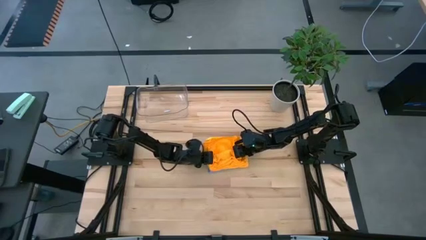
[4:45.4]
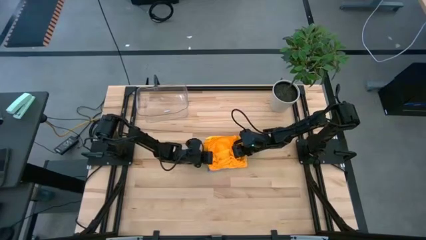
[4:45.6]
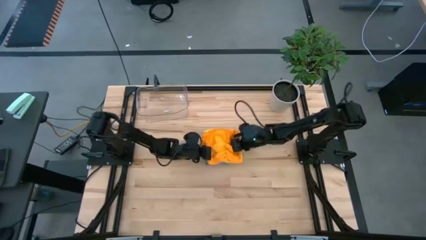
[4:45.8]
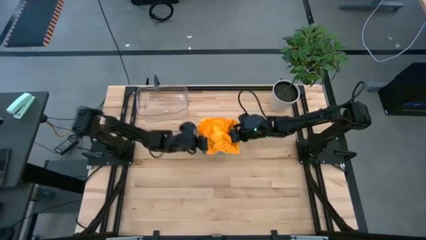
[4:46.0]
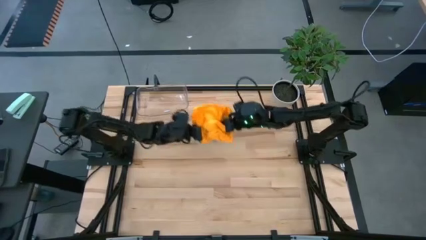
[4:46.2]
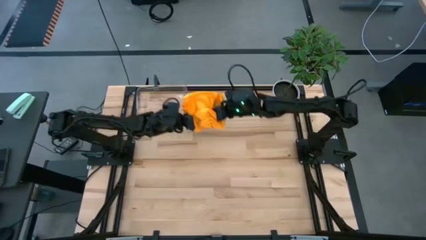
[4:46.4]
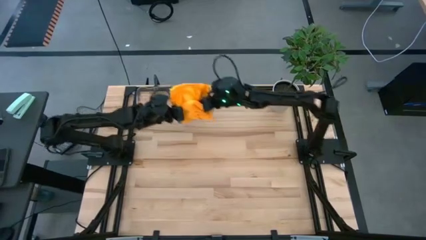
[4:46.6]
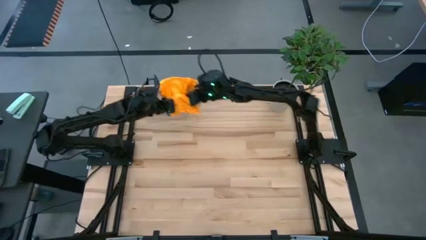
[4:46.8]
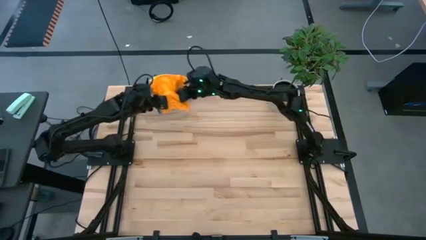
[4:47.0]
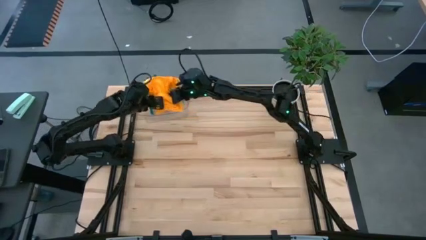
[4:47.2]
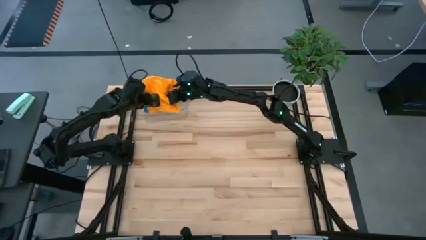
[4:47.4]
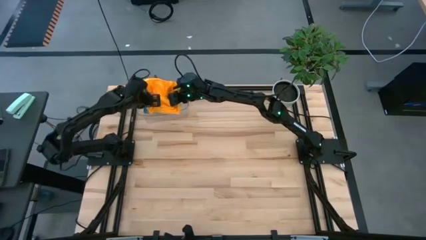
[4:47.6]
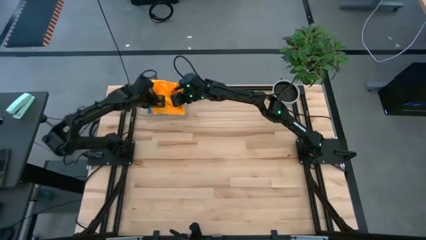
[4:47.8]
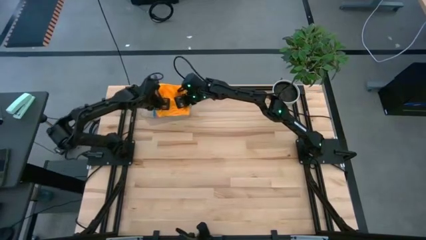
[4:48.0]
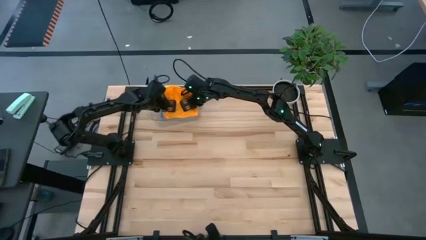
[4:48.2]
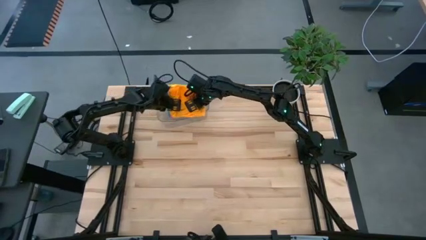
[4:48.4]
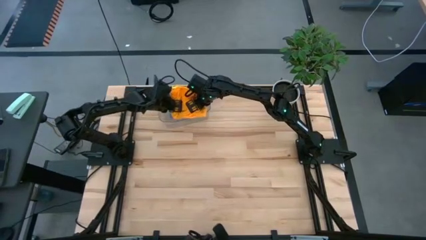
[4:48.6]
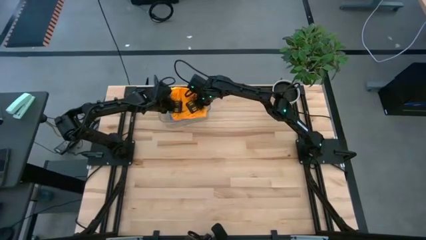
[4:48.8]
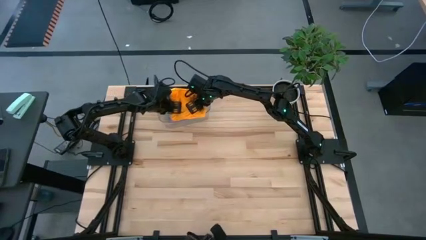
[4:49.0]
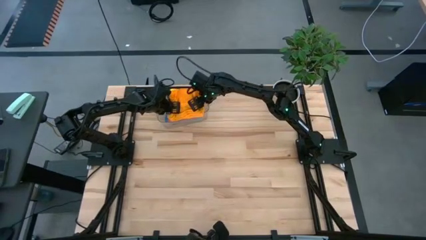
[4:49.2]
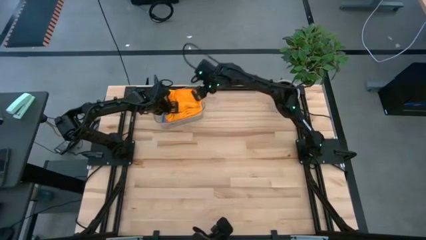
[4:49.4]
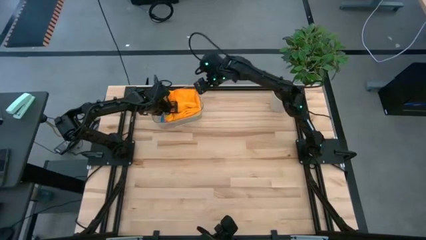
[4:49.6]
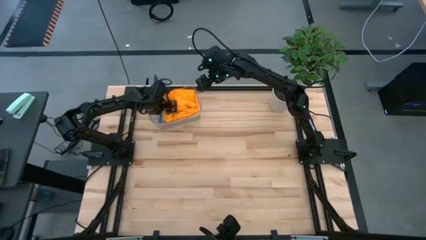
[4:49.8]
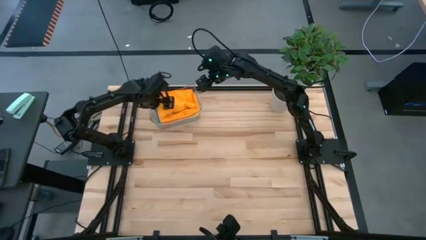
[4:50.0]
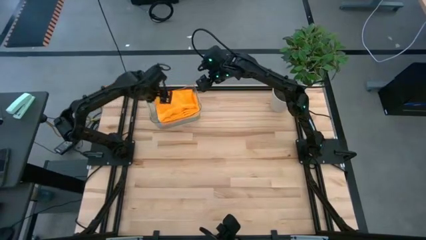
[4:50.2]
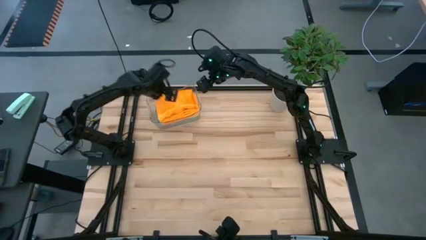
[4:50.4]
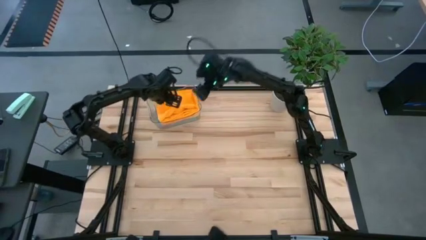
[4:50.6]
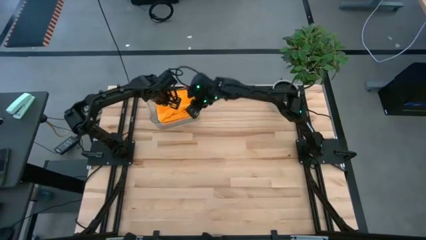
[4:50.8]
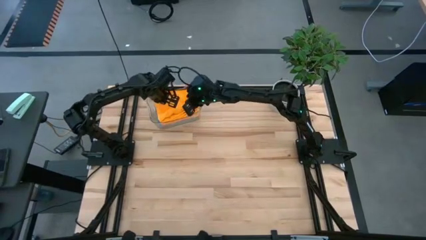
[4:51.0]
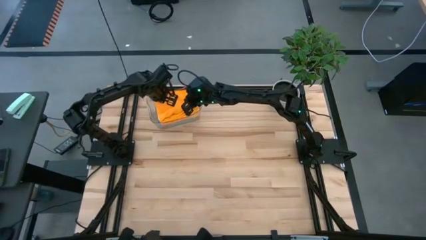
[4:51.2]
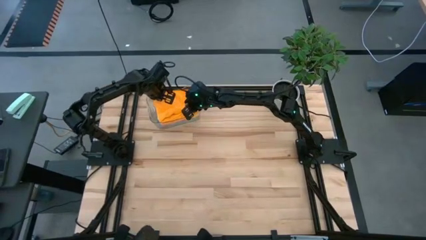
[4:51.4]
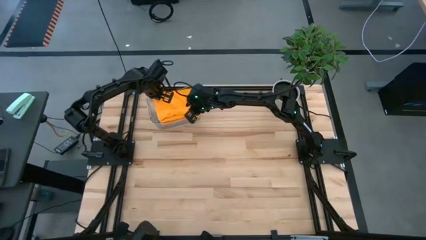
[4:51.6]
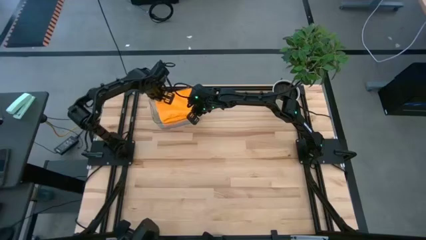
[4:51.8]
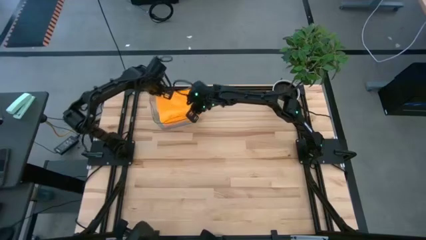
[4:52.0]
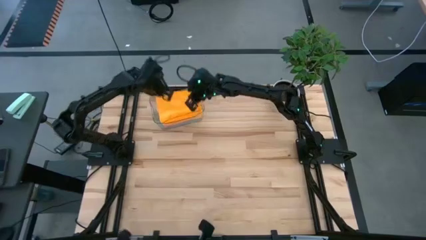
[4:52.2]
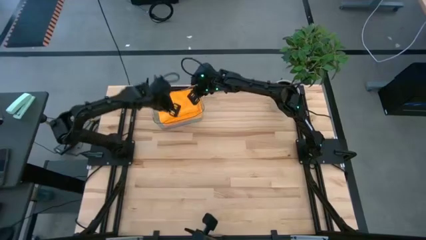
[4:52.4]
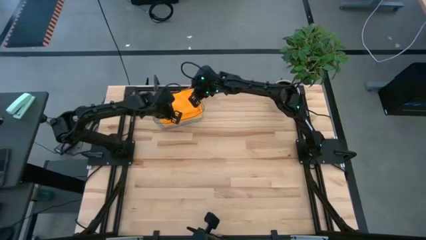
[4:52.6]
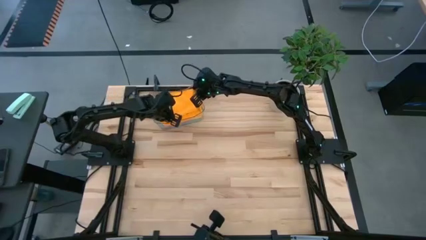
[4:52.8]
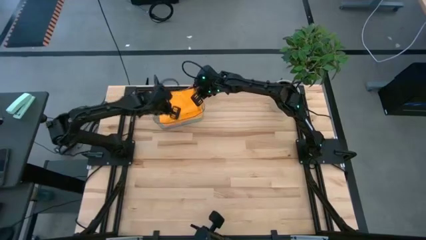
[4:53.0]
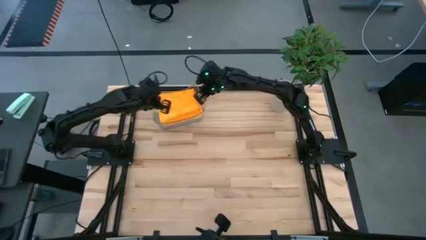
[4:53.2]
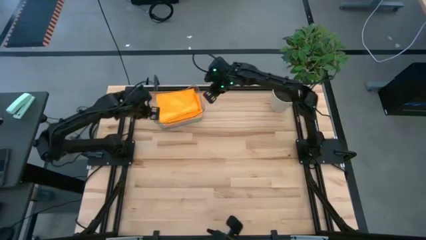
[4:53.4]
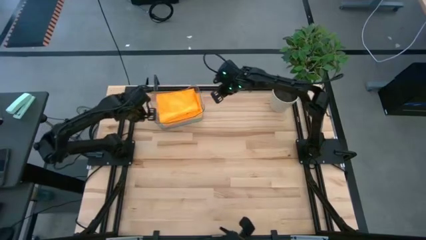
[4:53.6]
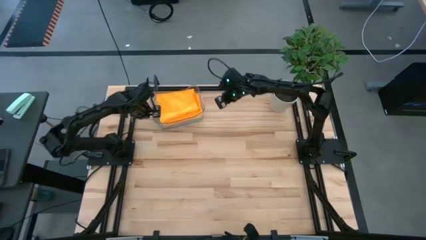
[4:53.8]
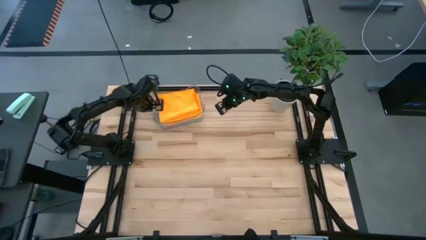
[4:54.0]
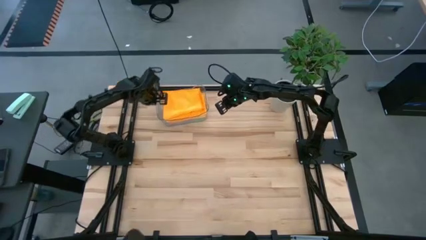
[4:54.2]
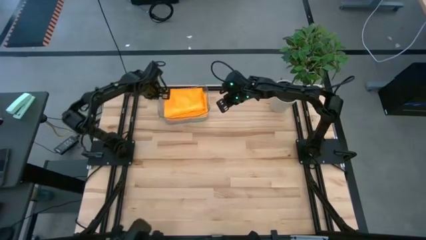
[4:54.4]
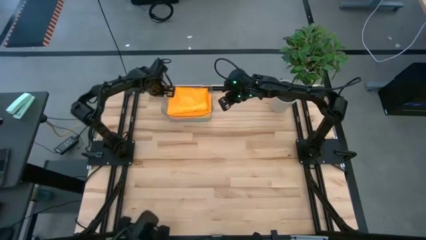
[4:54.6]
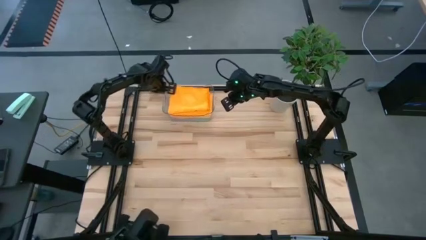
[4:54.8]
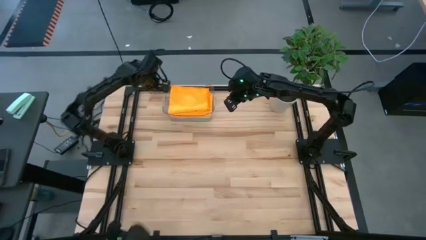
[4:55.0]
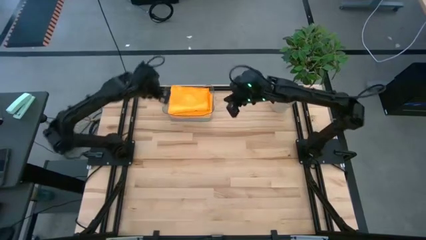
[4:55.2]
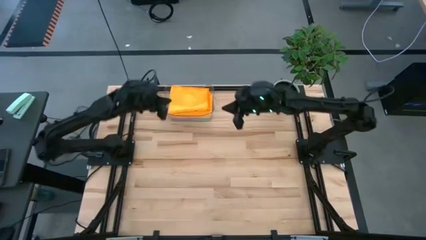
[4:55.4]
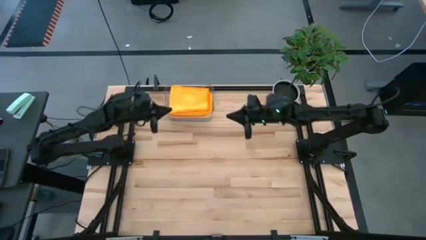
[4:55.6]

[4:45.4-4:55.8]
Task: Fold microfiber towels
Put the folded and stacked towels into the transparent bin

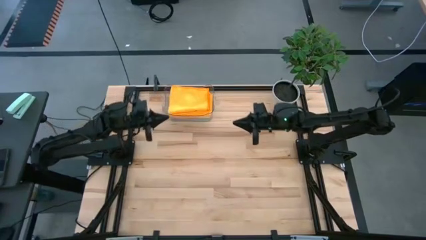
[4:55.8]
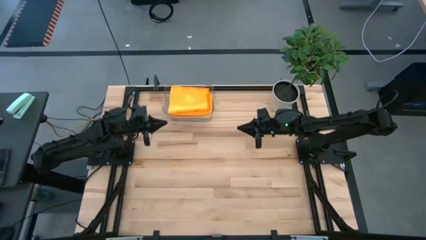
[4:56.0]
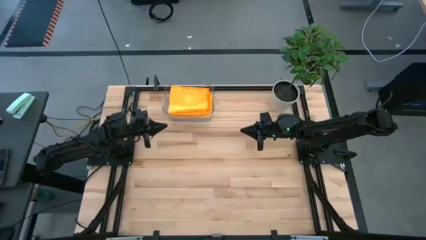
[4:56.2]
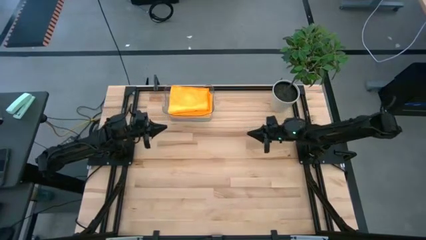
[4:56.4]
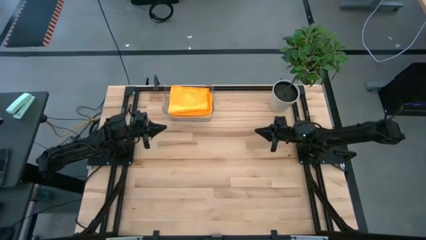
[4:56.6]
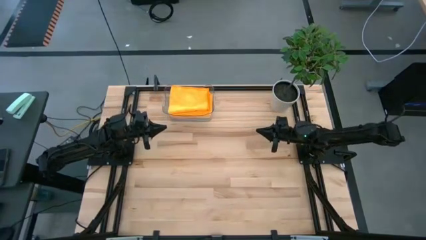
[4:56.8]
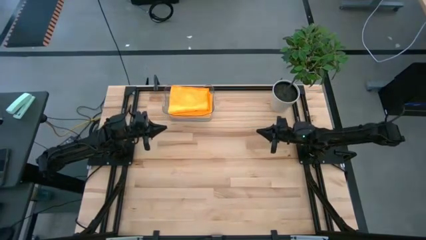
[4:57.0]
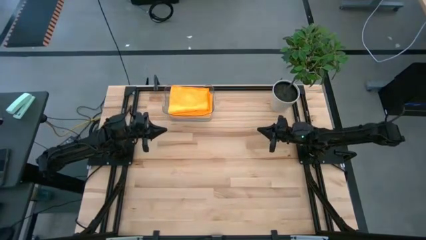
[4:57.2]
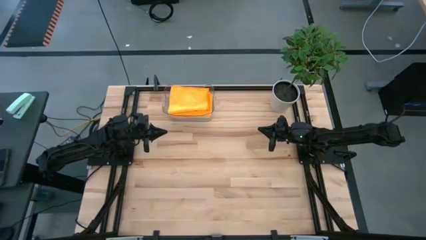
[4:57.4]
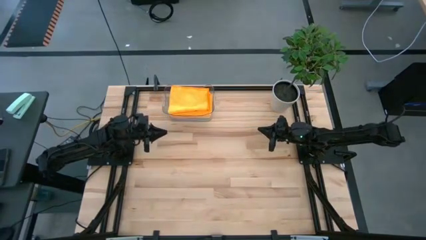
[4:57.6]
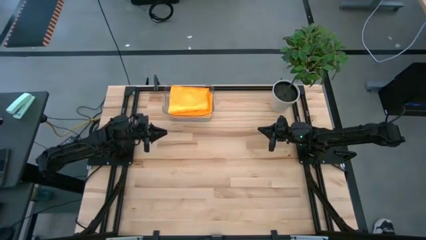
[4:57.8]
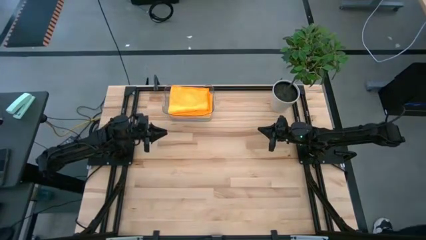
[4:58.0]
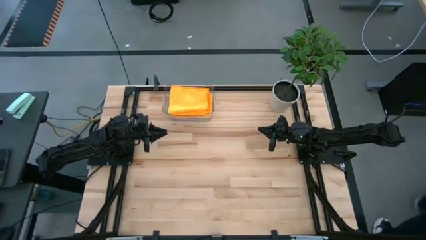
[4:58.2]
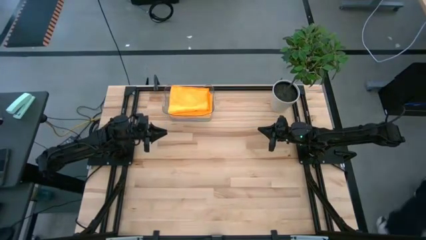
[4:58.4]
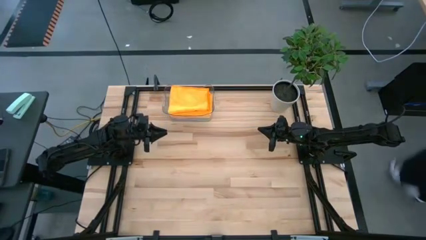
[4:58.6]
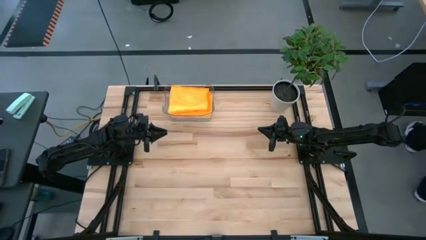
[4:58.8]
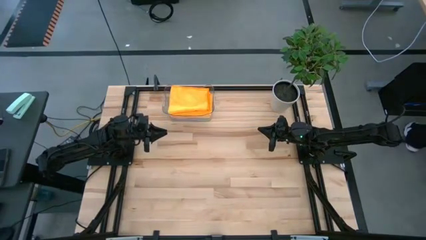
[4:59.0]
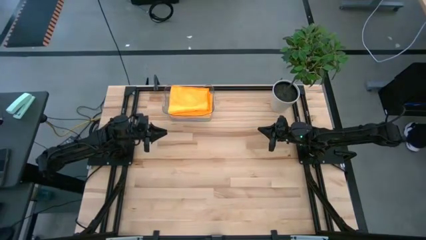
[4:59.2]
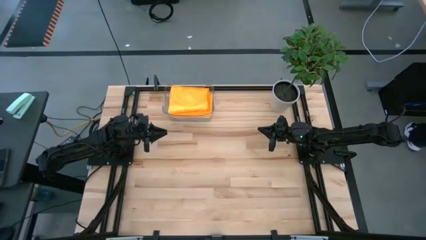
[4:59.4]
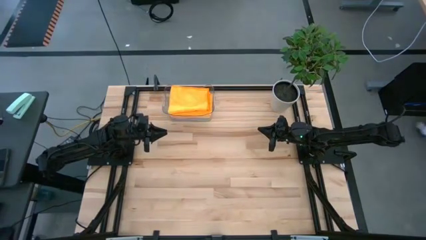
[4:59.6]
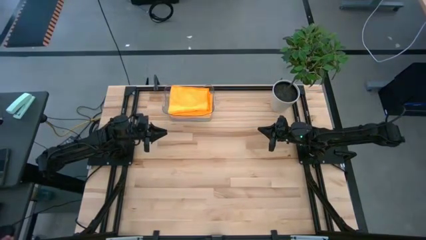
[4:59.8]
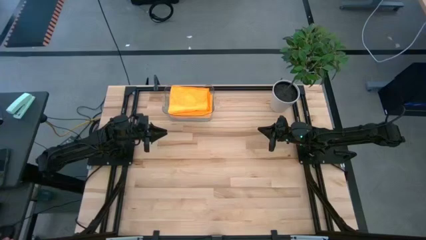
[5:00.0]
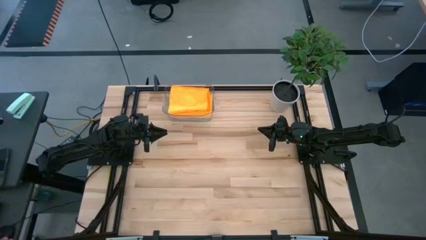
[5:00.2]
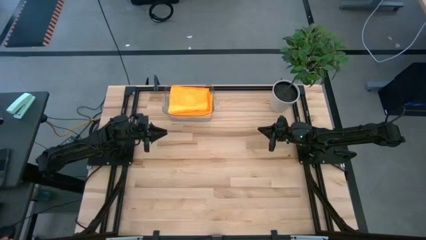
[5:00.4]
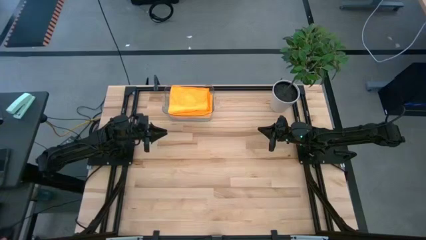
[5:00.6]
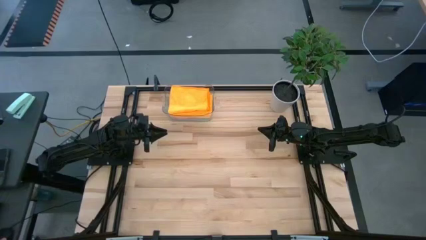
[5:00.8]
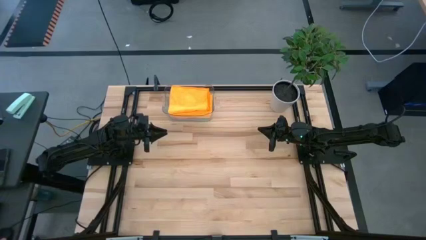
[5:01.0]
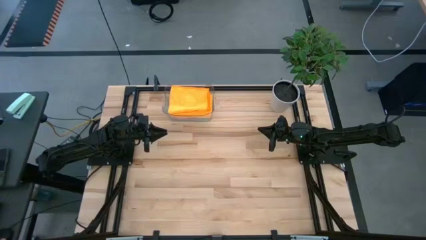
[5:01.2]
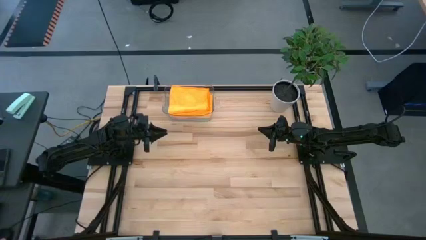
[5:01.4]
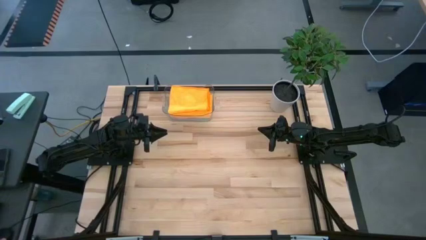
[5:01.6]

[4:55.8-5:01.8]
Return to Home Position
